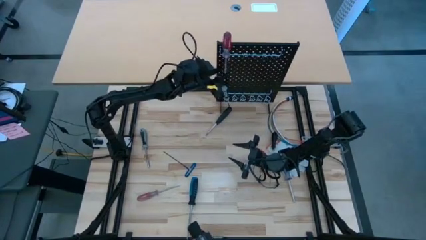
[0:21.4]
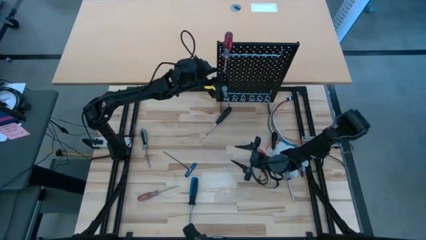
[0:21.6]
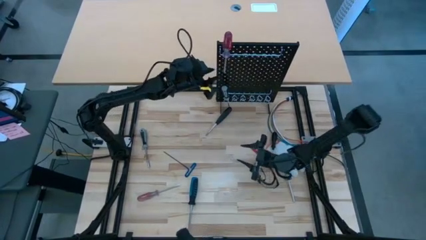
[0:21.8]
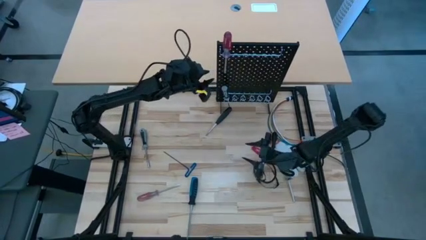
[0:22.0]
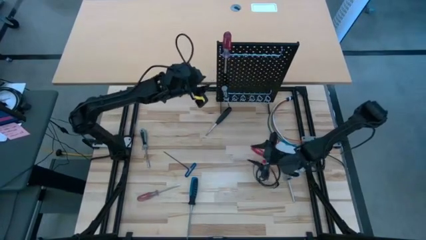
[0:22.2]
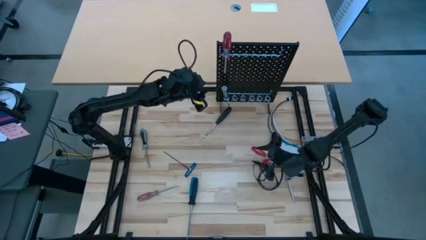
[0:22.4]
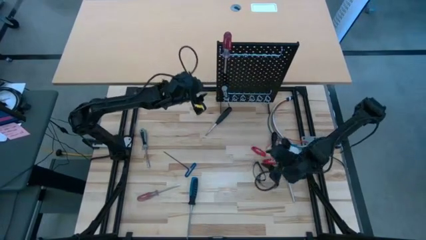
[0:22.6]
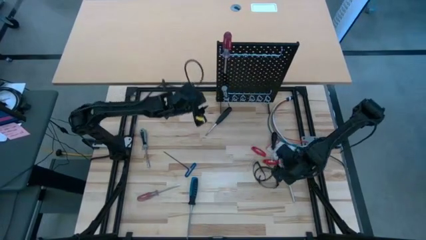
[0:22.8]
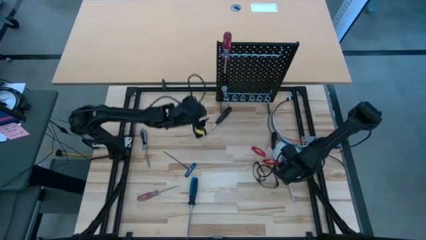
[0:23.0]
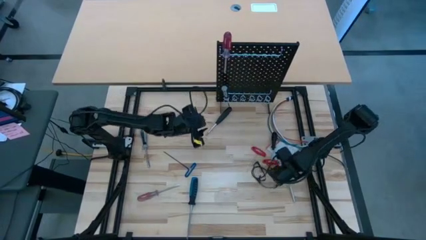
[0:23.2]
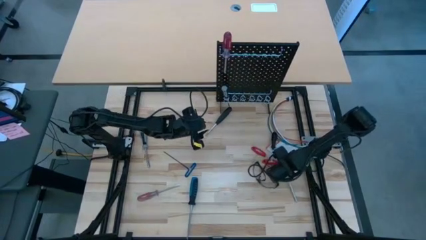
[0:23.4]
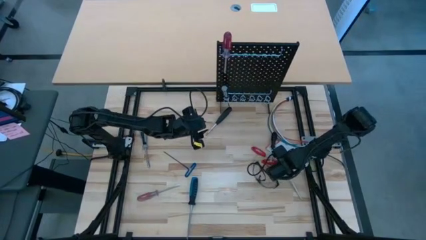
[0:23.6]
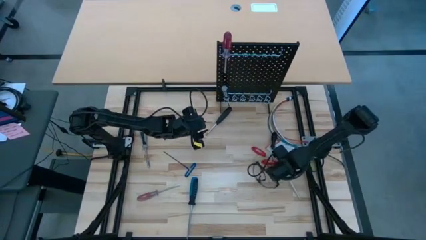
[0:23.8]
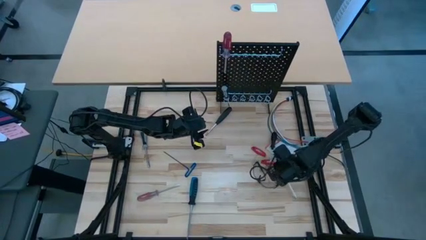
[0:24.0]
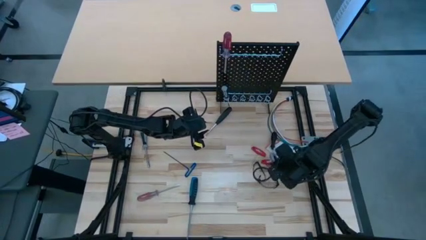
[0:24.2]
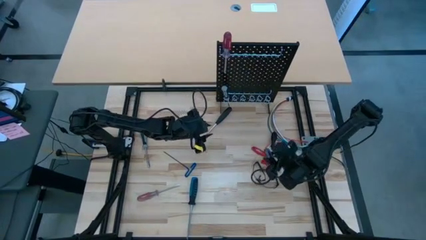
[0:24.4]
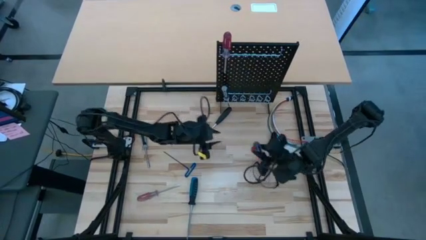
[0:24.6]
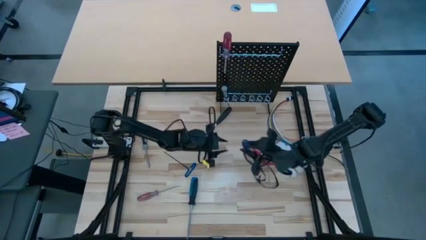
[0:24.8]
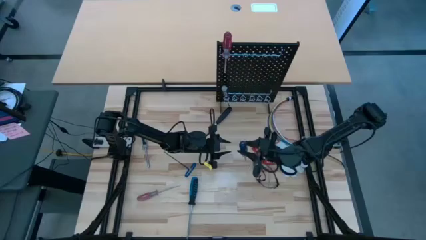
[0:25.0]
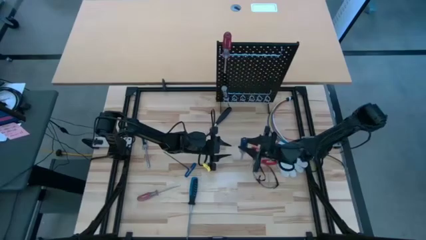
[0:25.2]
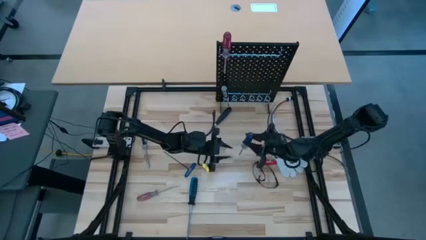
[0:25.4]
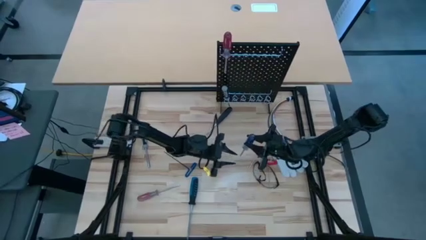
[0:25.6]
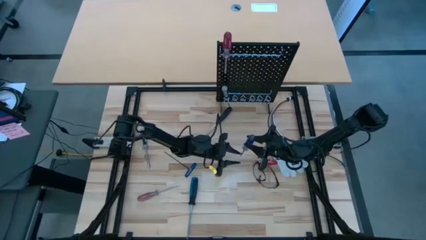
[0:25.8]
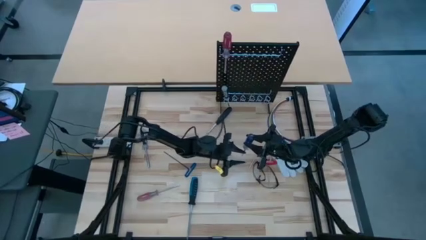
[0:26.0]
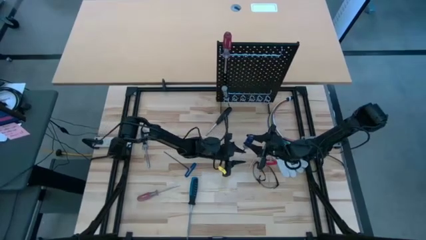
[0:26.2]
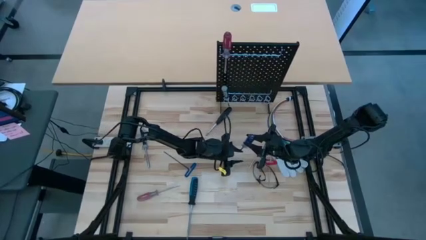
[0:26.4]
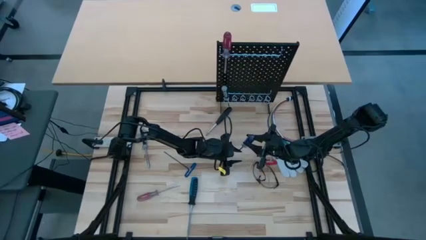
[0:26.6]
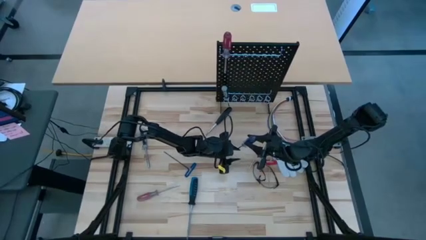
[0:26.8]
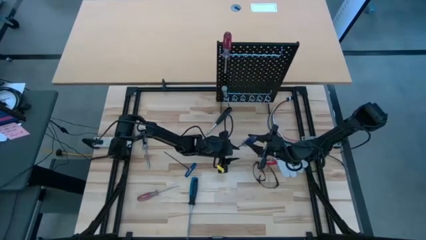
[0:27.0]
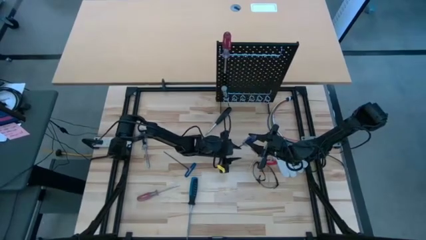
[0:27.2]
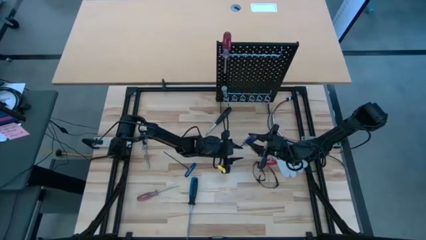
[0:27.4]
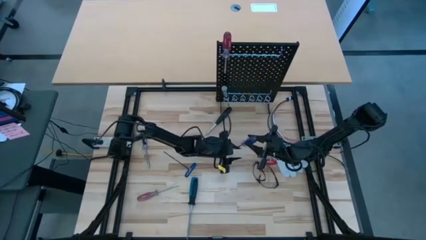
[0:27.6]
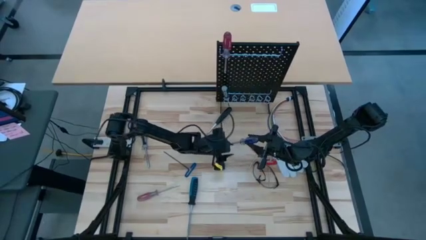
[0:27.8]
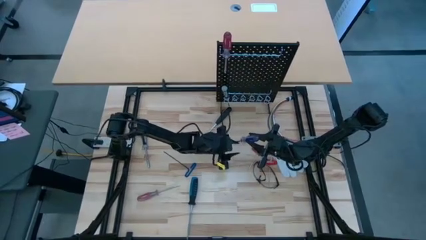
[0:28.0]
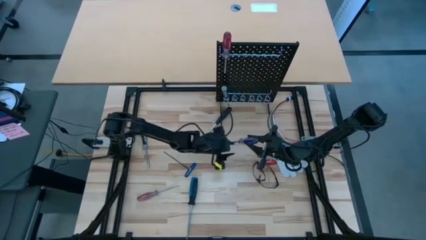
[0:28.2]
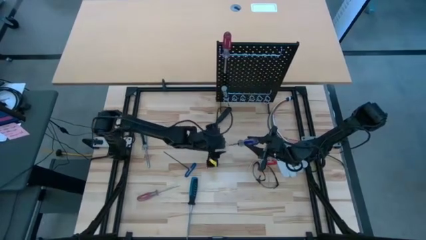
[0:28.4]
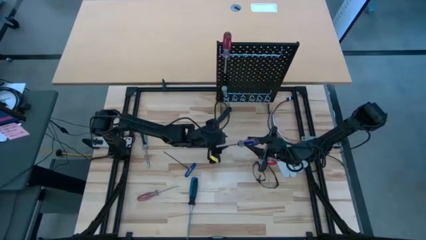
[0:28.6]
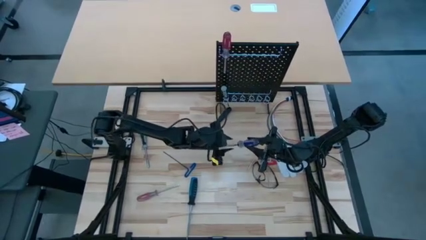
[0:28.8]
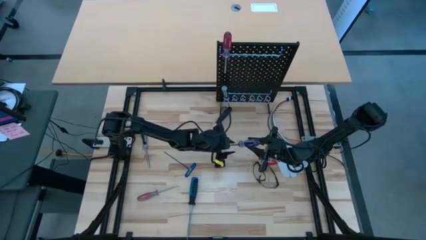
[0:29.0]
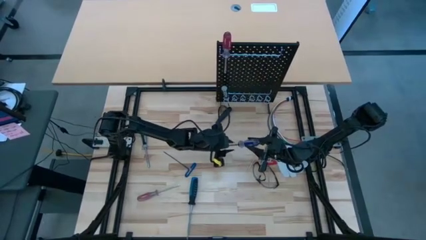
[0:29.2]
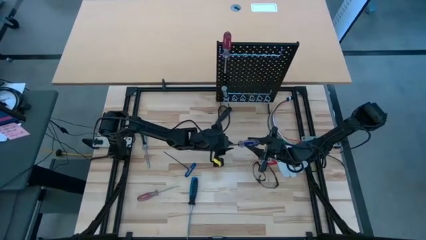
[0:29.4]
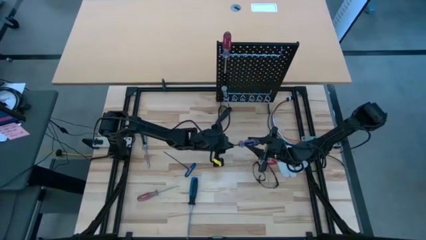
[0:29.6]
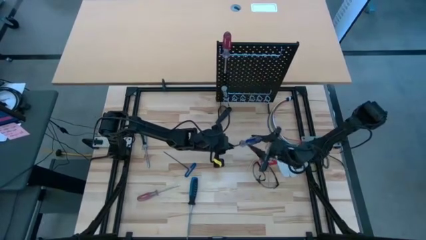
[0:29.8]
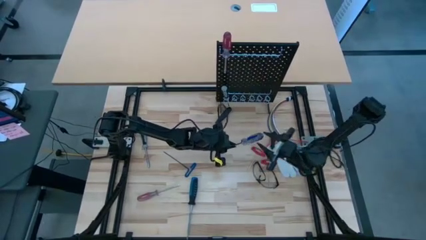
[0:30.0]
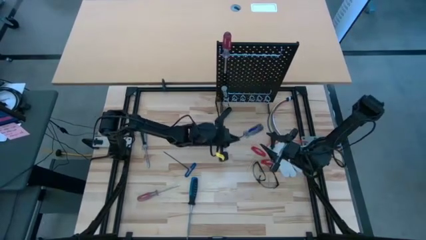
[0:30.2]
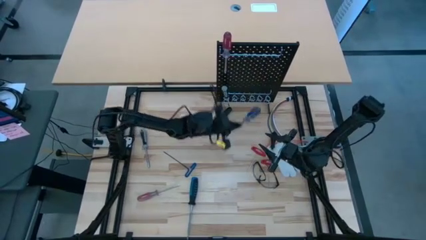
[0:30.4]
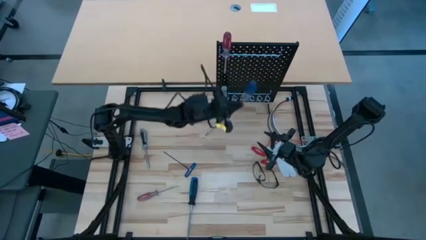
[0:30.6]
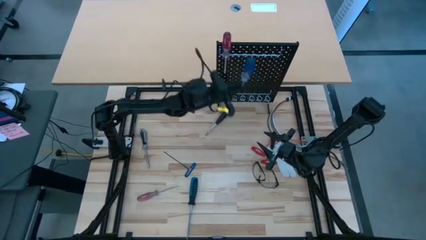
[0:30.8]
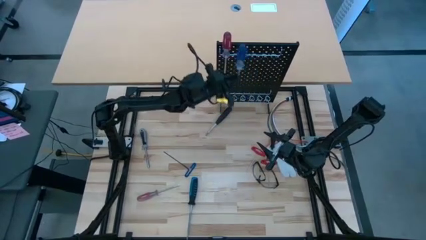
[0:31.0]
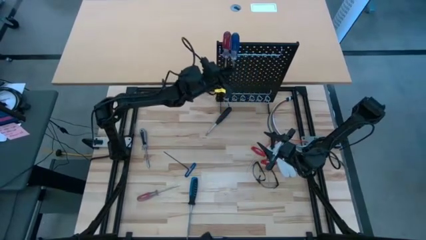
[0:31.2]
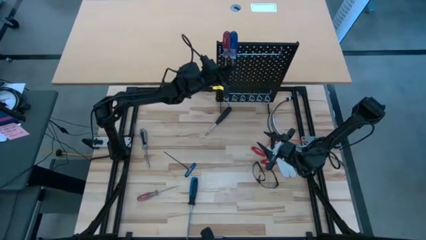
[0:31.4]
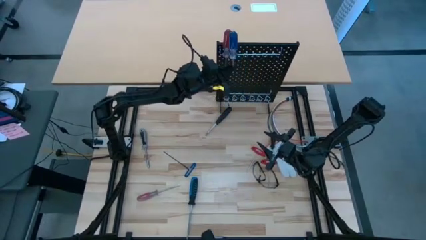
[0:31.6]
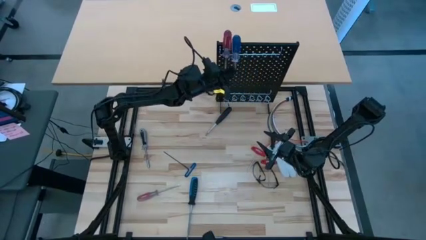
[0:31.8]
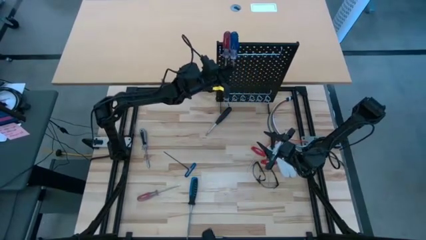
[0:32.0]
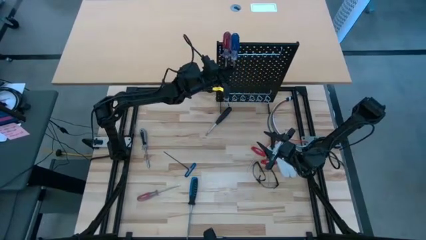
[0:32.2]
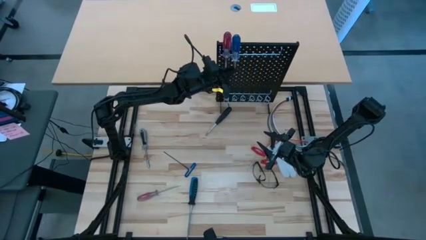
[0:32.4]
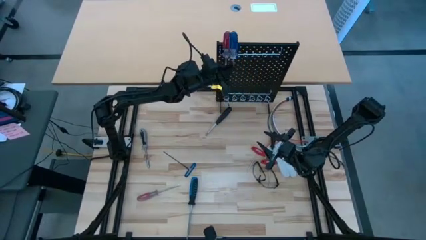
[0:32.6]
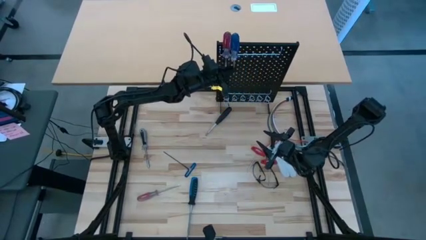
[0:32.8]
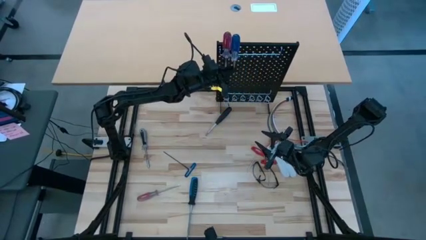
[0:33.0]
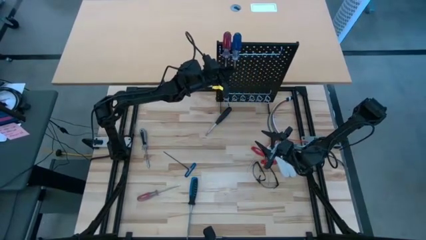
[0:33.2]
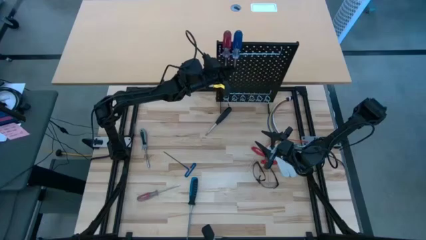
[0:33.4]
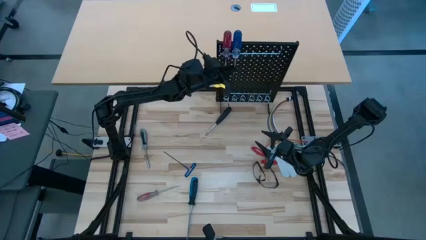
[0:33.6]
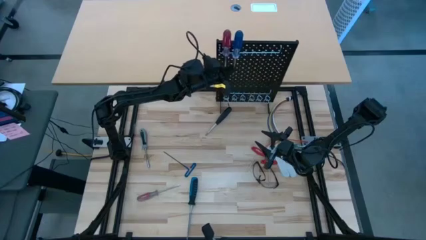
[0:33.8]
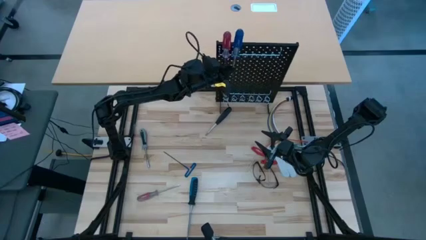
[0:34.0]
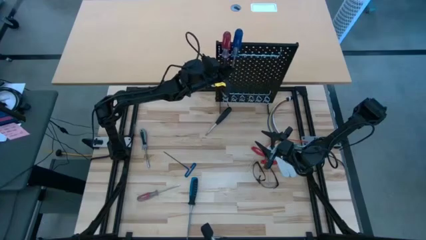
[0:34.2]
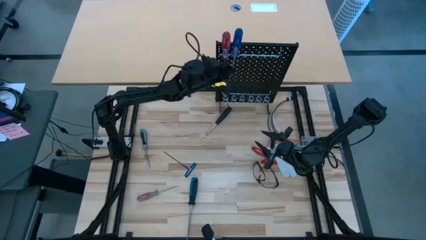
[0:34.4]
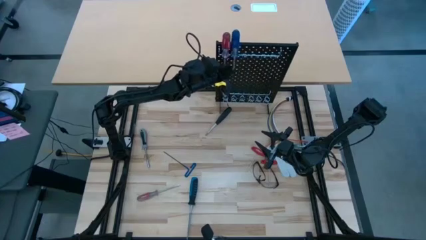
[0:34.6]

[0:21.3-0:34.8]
Task: Hang tools onto peg board
Hang the right blue screwdriver on the pegboard
